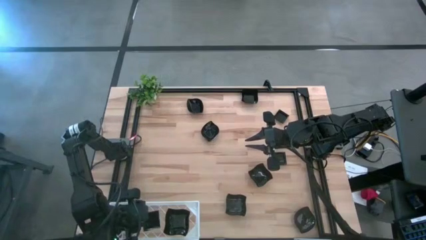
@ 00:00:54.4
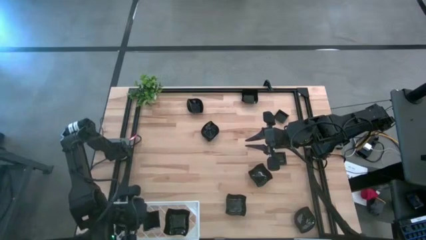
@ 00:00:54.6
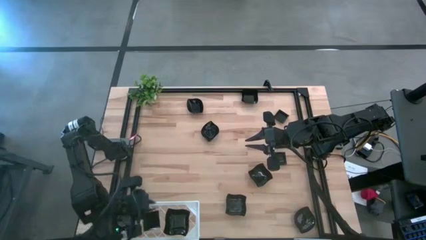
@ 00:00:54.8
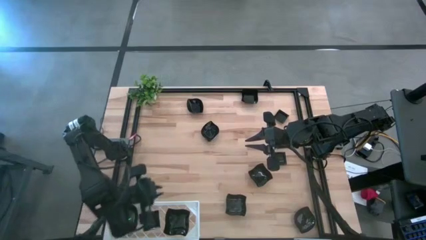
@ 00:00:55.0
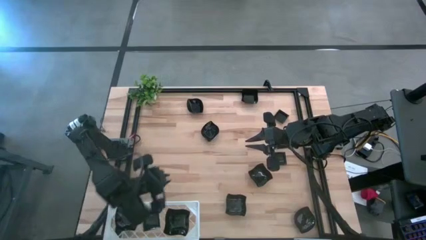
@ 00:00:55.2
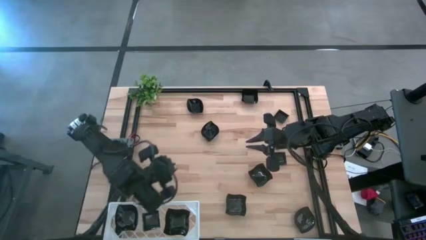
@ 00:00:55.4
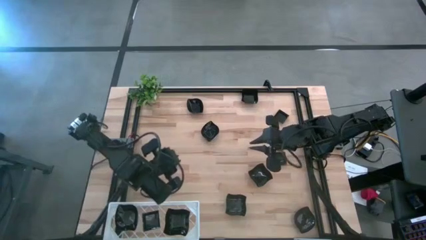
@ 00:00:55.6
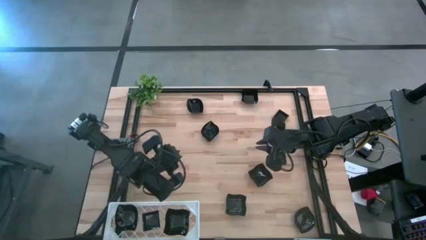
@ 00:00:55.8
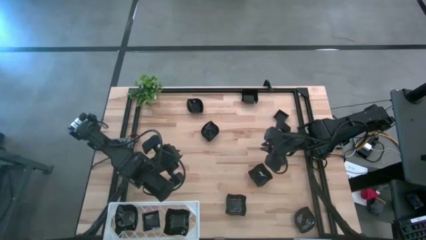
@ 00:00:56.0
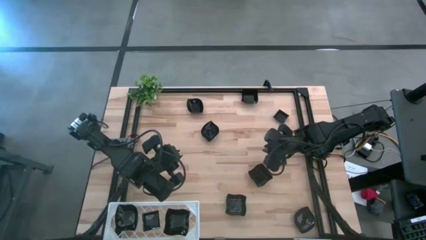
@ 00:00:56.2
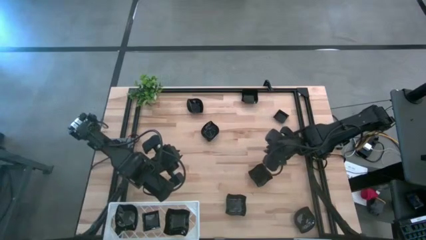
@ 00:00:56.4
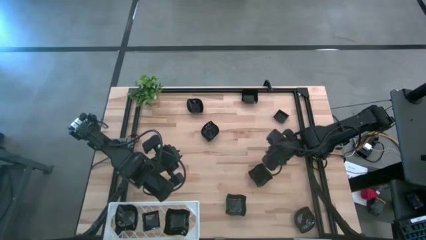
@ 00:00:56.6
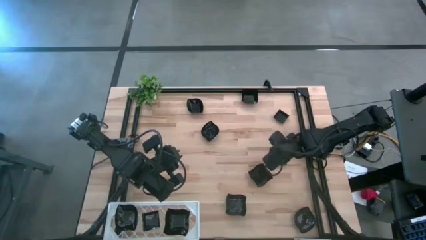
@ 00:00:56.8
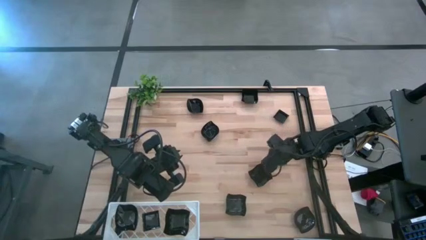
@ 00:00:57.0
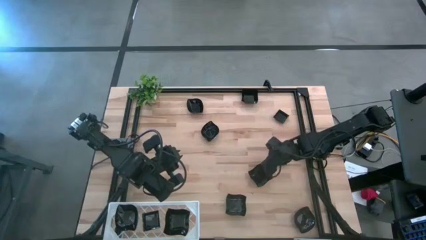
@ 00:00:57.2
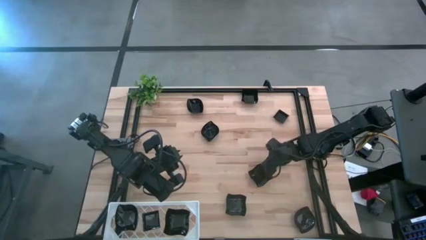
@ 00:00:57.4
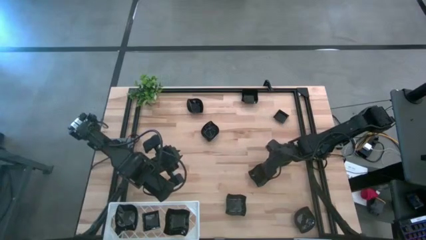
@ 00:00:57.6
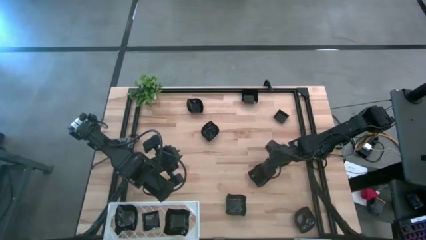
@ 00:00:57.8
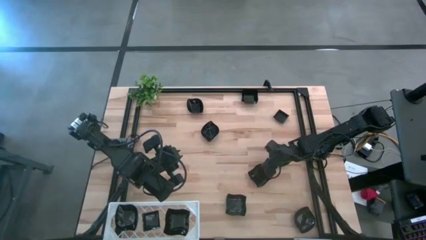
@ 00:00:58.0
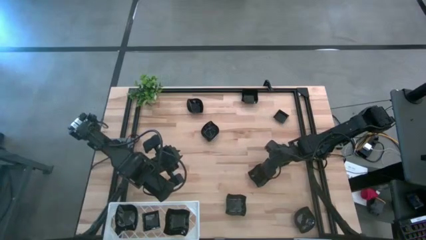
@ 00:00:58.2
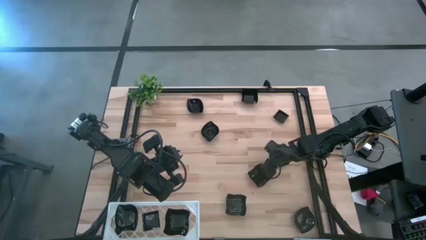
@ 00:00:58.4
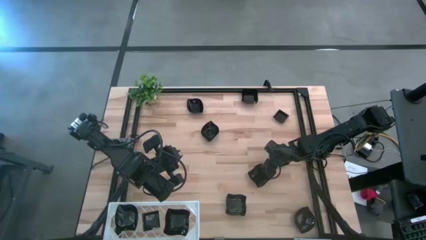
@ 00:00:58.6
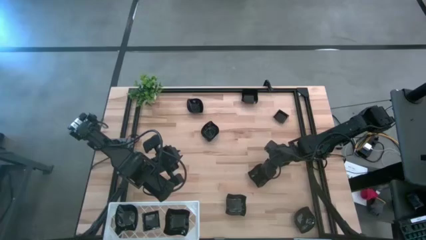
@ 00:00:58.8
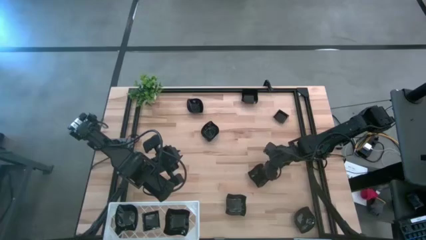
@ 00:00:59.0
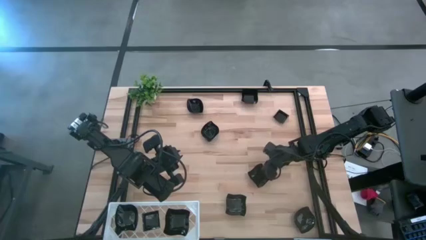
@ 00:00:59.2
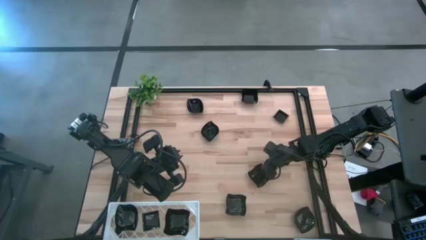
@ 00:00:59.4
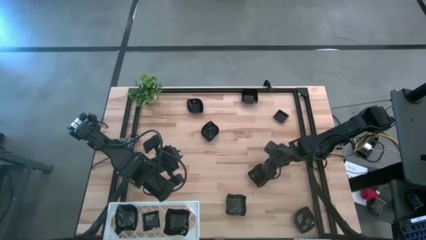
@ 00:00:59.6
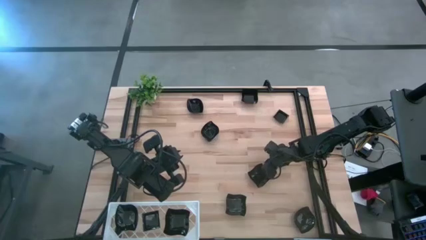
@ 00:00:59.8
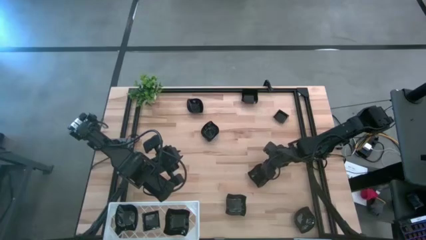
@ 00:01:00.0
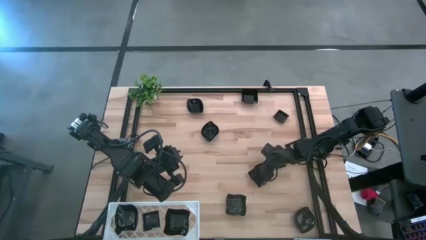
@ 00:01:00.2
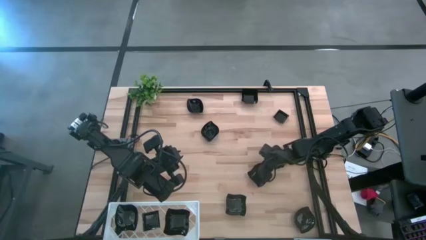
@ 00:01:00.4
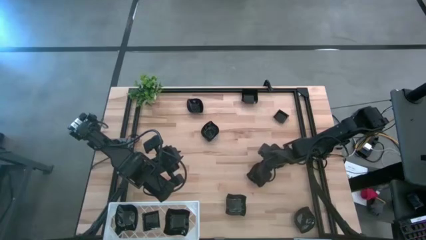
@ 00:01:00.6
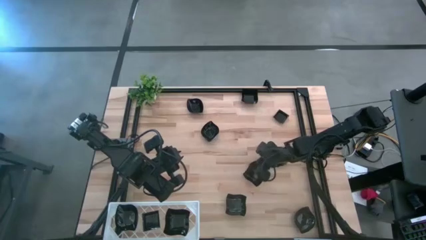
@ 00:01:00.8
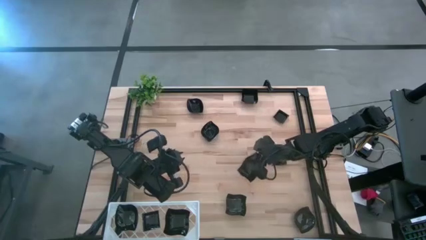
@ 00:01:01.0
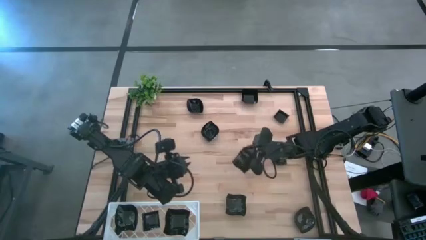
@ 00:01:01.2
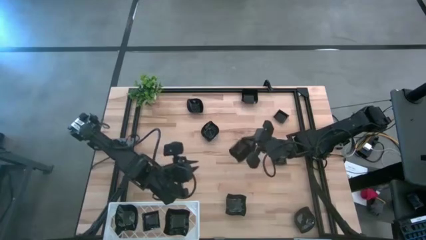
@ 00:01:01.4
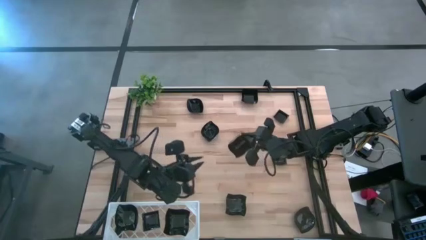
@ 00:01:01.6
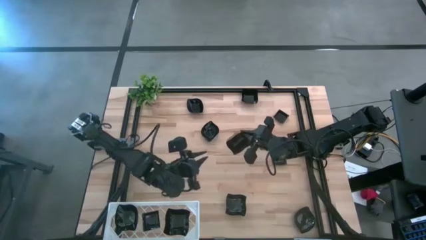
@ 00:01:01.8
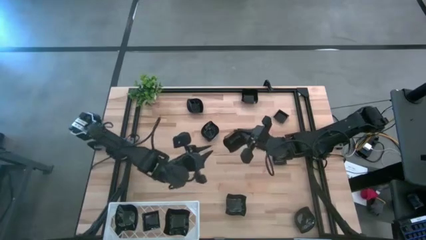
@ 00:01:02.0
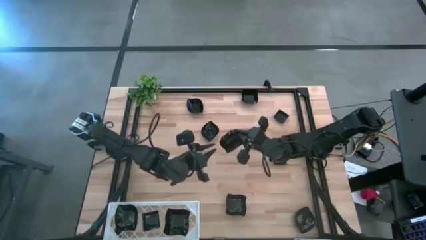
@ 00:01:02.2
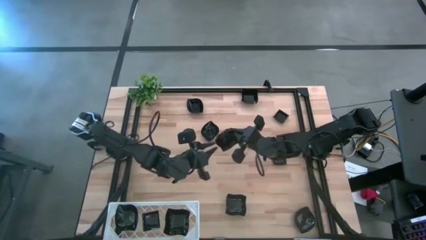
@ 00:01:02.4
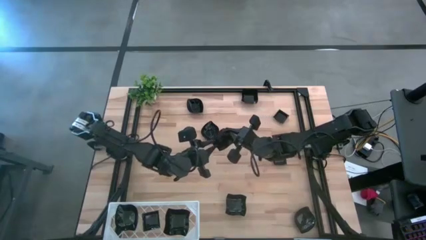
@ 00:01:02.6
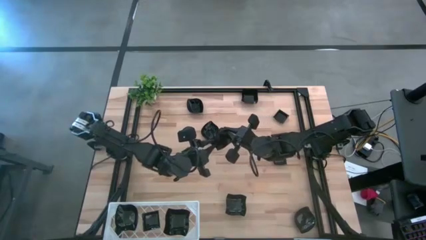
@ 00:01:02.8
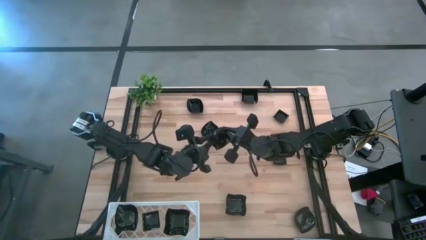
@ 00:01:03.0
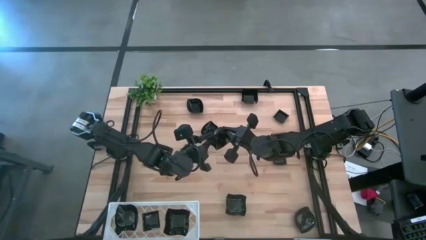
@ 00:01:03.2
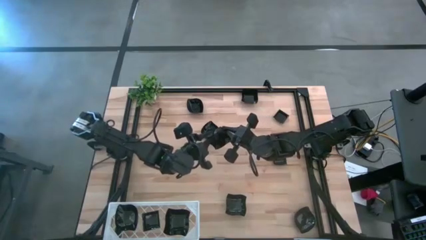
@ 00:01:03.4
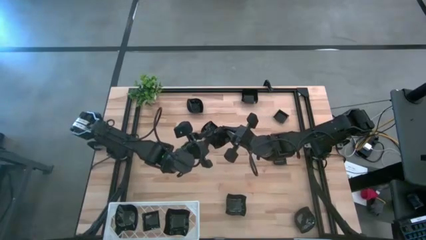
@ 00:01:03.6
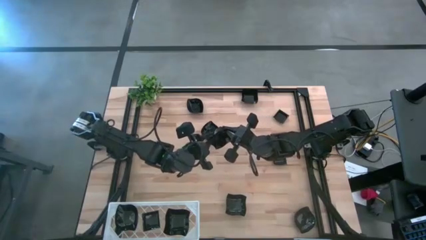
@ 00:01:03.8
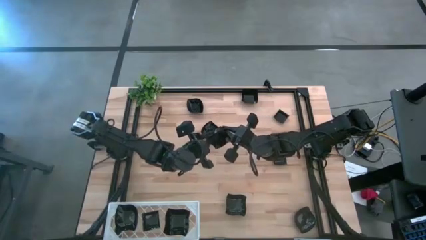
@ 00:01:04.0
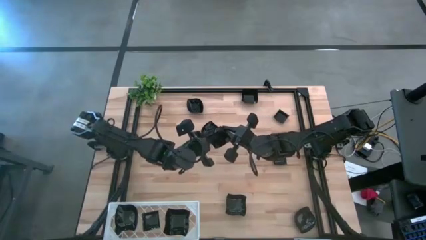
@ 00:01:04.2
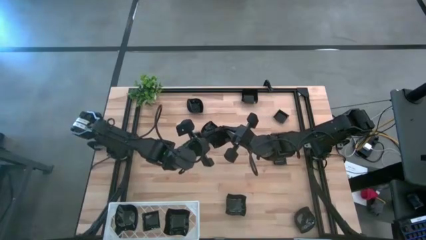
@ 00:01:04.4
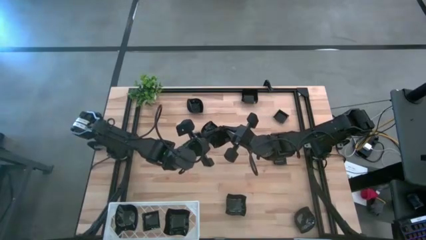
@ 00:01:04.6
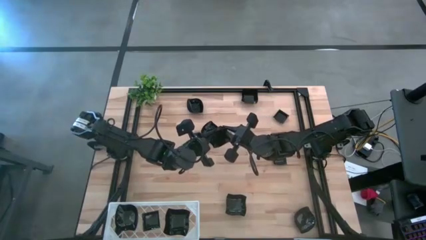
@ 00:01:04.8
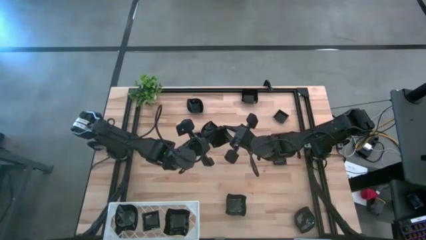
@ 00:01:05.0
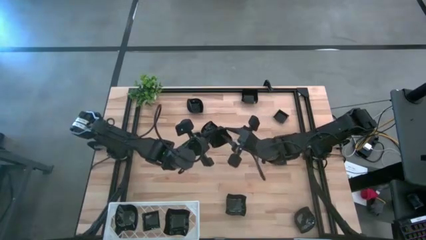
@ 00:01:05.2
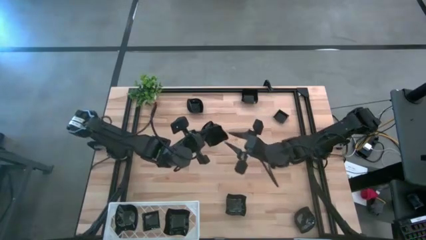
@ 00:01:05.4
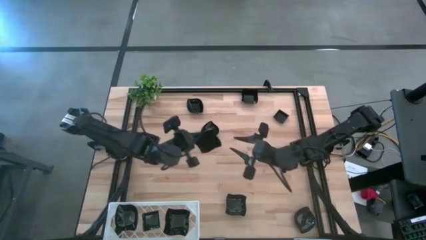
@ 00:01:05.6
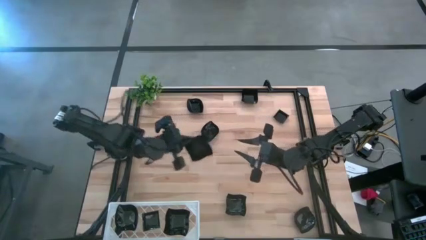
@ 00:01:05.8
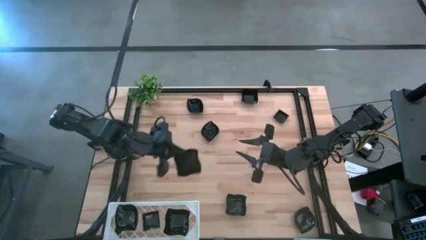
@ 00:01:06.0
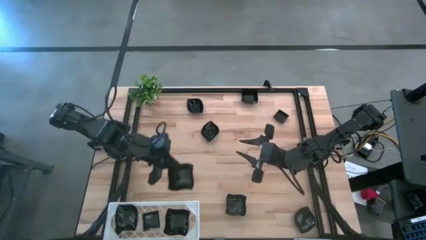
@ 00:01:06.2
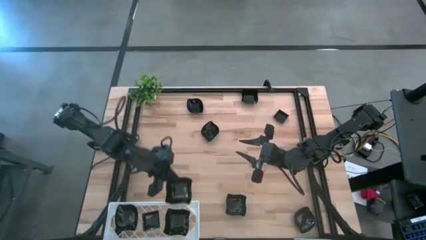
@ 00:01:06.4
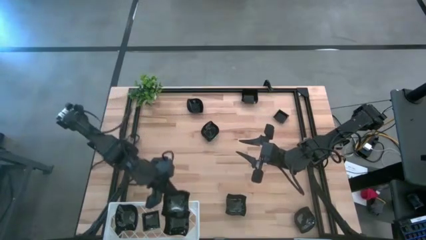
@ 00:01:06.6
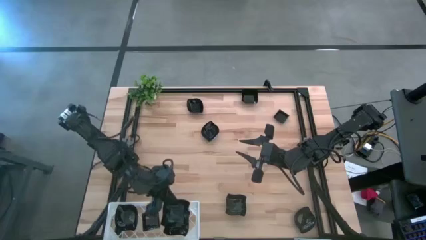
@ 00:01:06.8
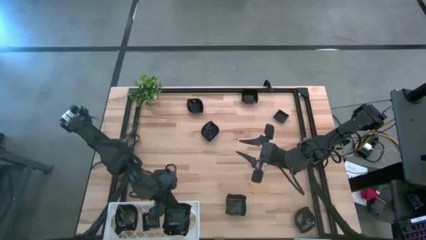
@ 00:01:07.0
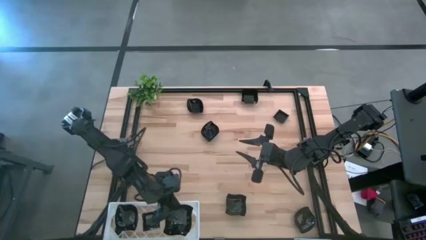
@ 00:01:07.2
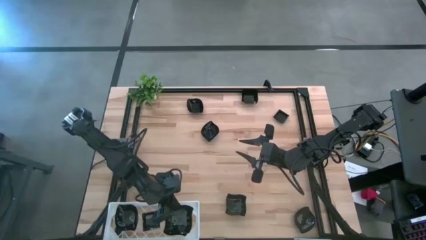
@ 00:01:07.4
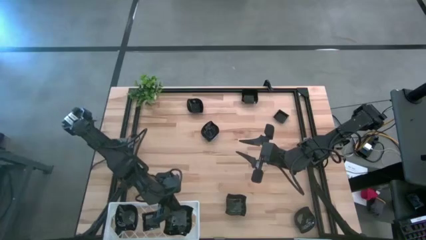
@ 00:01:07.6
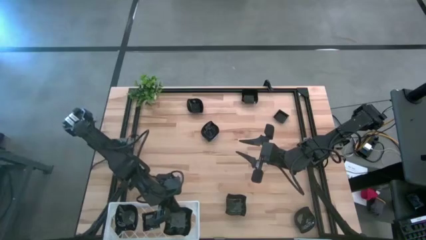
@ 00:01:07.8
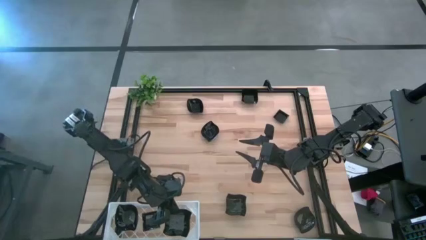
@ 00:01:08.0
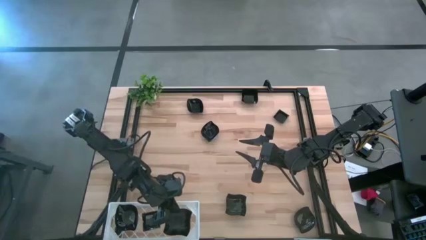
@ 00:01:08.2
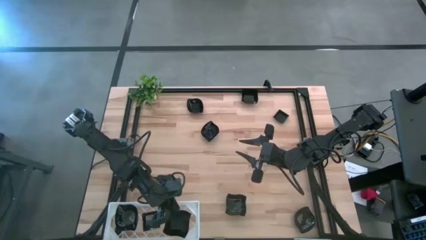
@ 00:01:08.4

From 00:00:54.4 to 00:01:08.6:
Task: Pick & Place Mini shaped plates
Stack the black distorted square plate on top of the other black distorted square plate on the shelf
